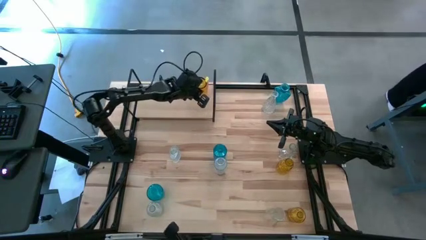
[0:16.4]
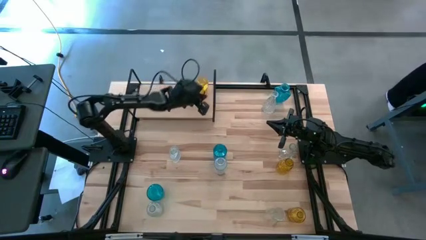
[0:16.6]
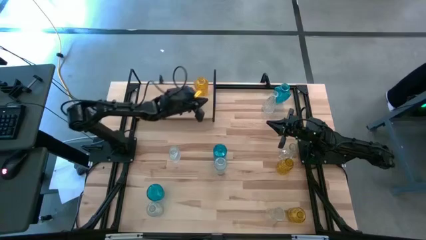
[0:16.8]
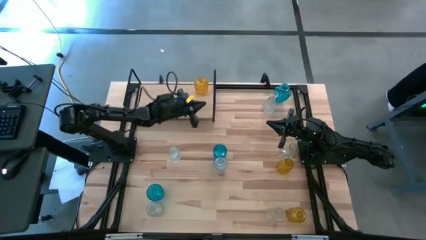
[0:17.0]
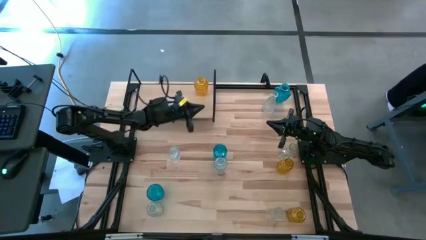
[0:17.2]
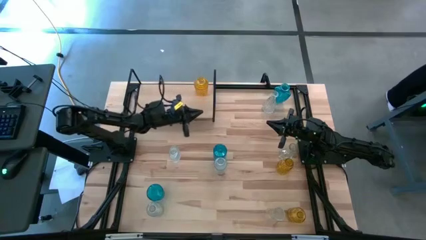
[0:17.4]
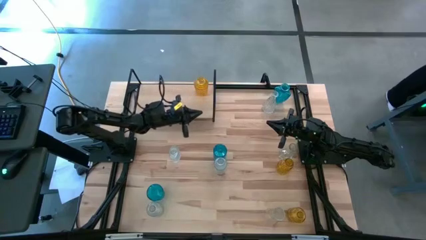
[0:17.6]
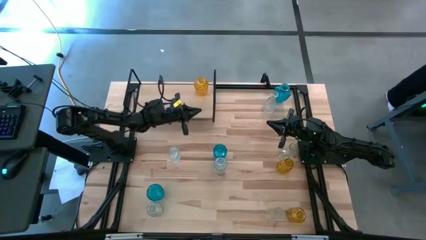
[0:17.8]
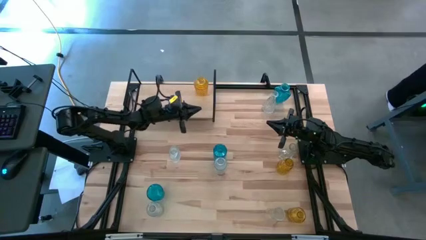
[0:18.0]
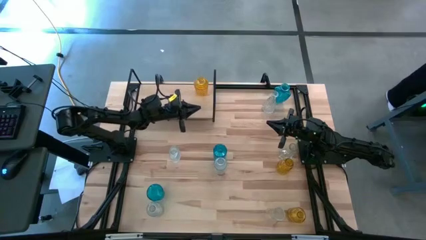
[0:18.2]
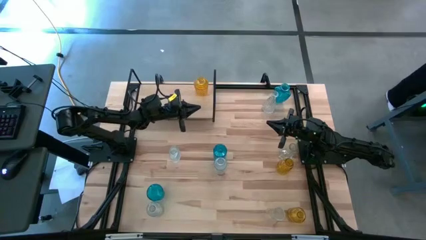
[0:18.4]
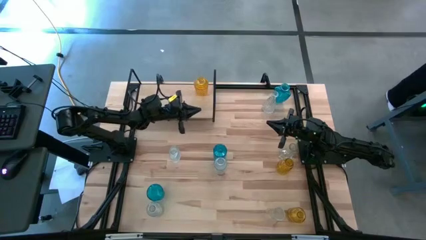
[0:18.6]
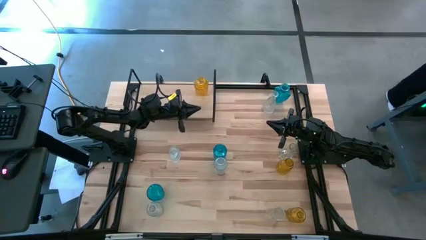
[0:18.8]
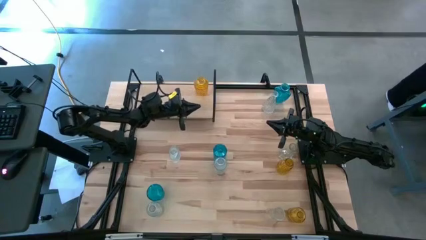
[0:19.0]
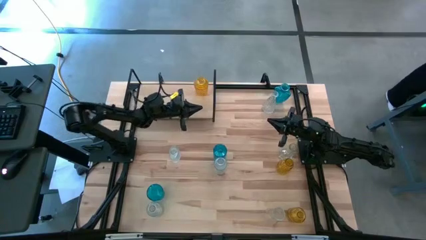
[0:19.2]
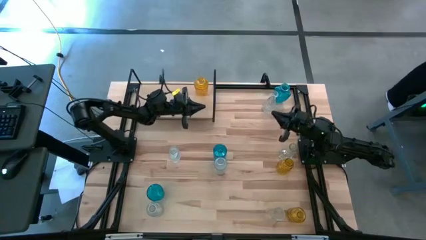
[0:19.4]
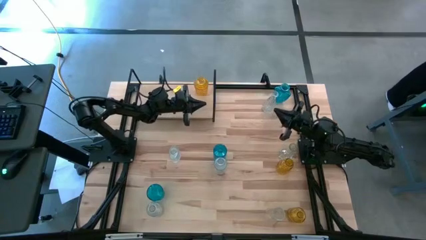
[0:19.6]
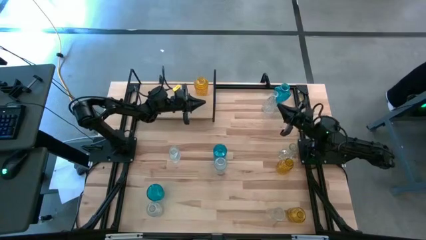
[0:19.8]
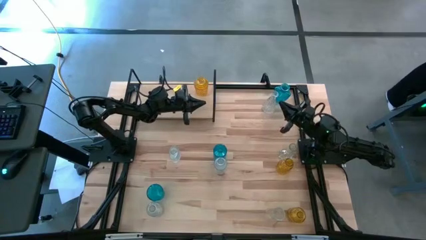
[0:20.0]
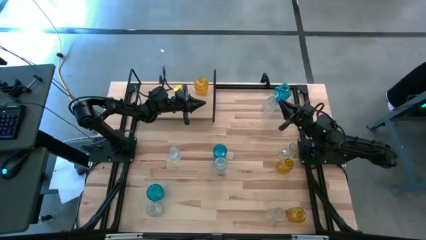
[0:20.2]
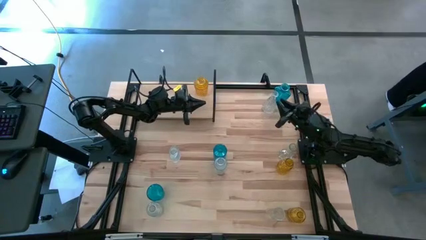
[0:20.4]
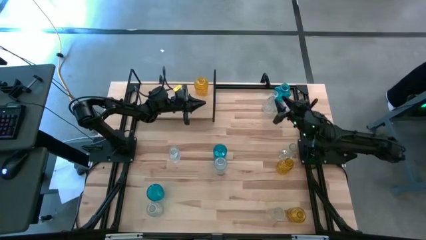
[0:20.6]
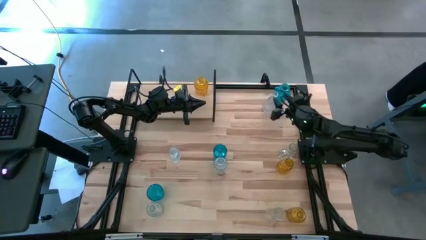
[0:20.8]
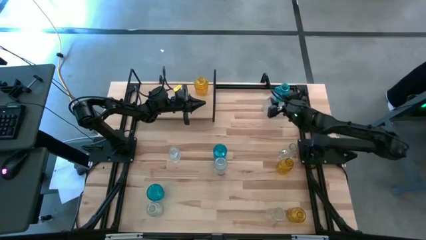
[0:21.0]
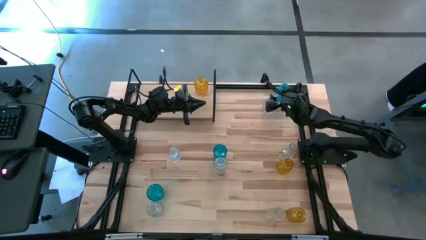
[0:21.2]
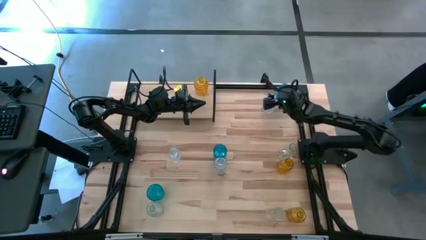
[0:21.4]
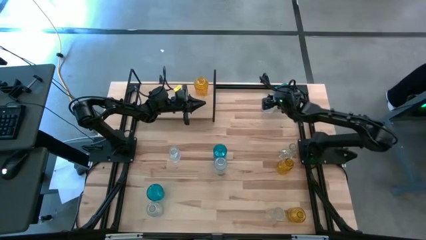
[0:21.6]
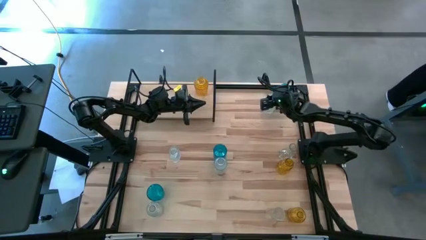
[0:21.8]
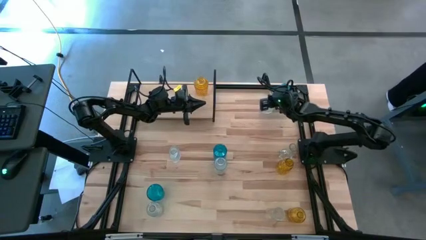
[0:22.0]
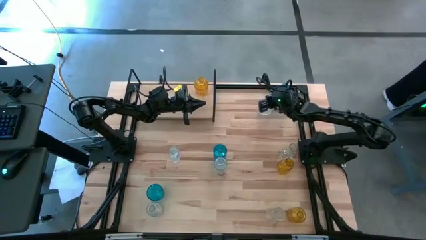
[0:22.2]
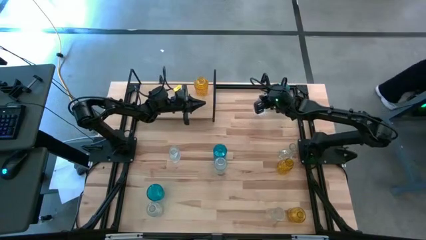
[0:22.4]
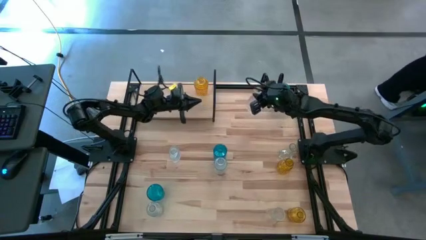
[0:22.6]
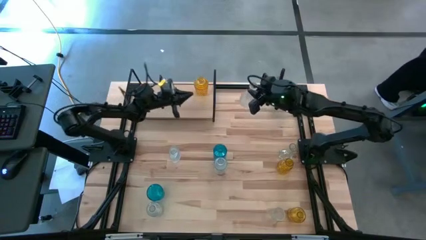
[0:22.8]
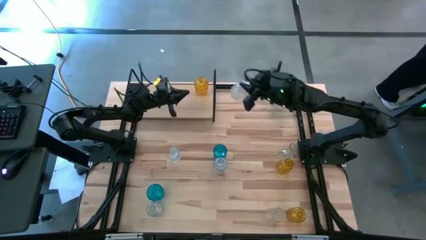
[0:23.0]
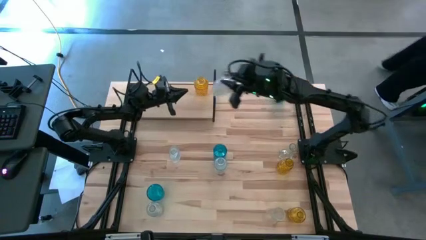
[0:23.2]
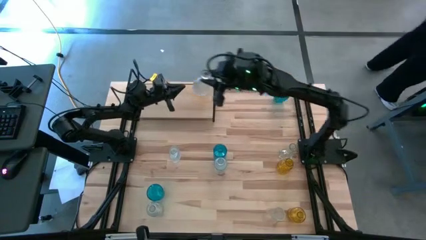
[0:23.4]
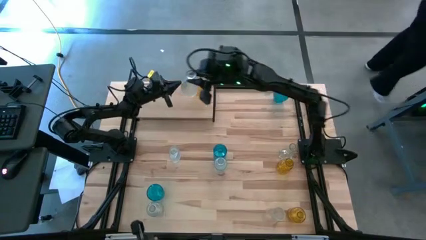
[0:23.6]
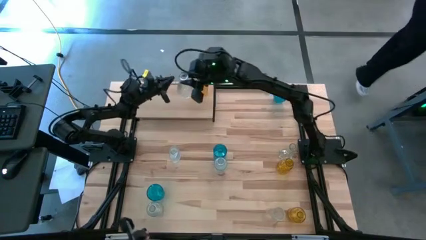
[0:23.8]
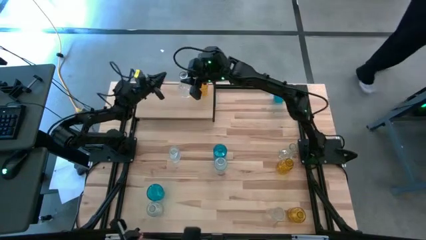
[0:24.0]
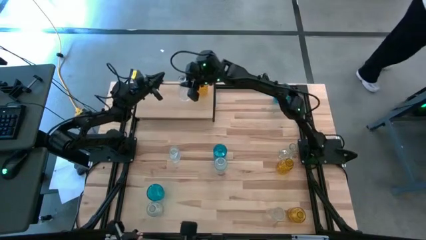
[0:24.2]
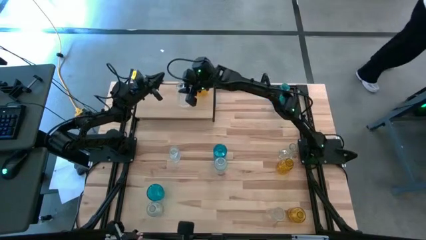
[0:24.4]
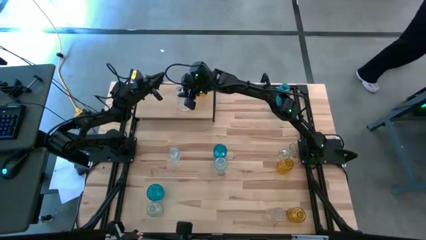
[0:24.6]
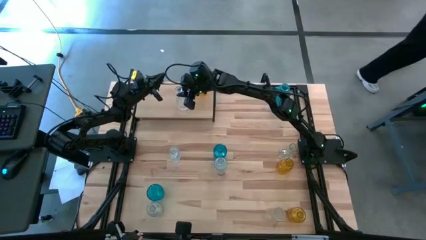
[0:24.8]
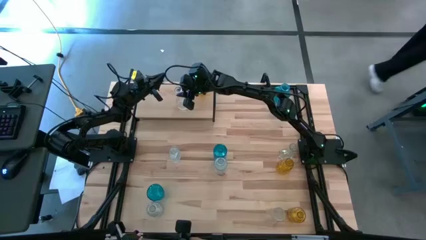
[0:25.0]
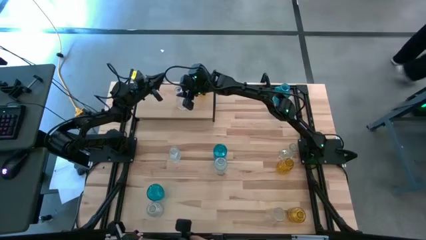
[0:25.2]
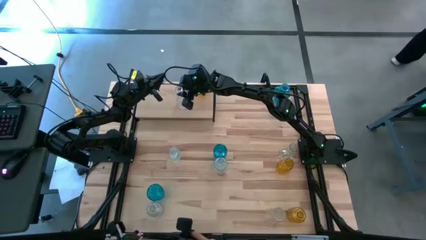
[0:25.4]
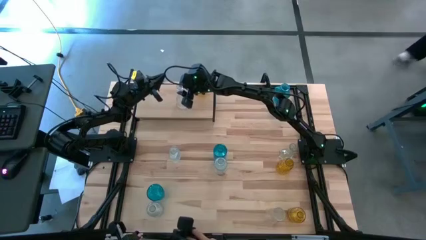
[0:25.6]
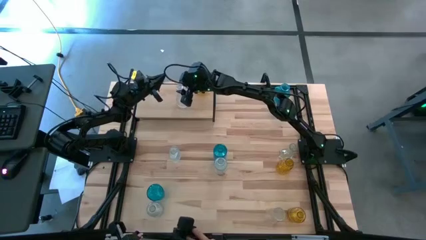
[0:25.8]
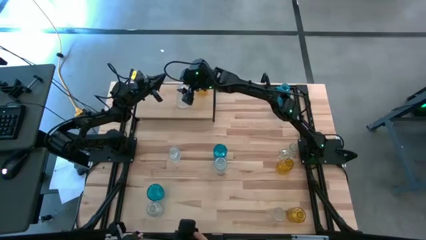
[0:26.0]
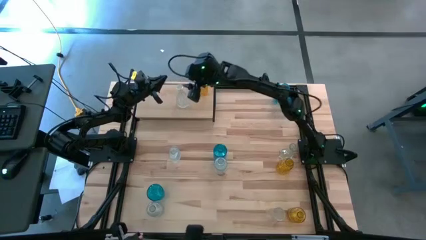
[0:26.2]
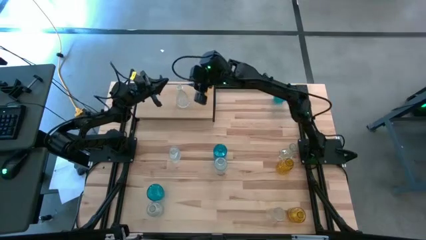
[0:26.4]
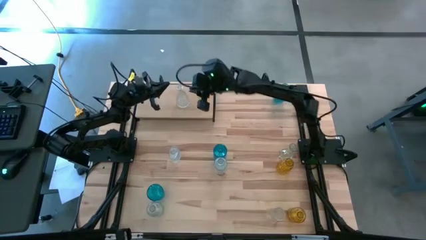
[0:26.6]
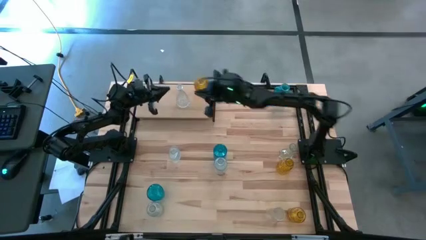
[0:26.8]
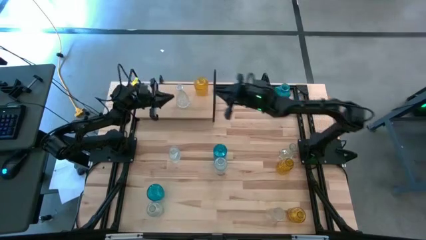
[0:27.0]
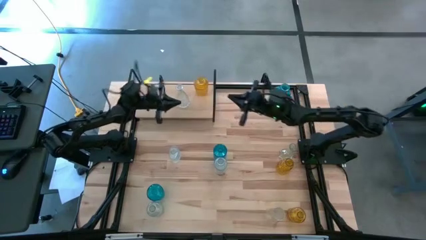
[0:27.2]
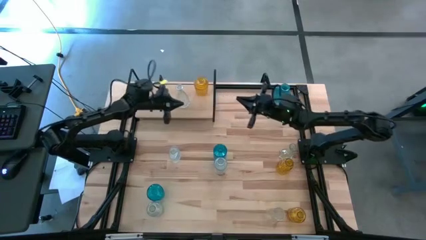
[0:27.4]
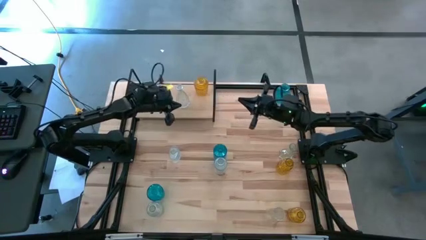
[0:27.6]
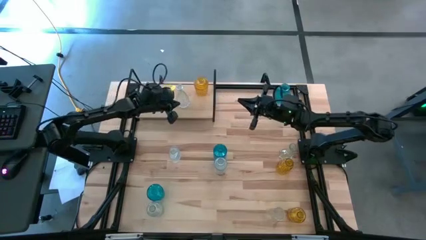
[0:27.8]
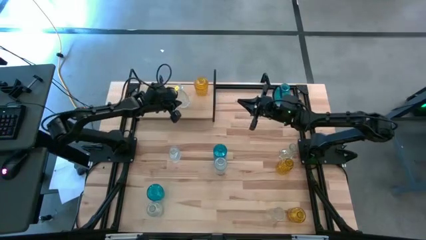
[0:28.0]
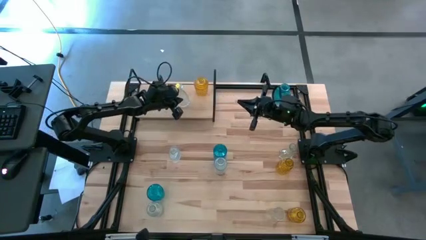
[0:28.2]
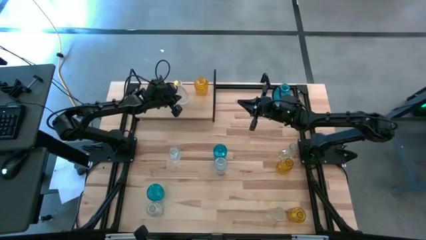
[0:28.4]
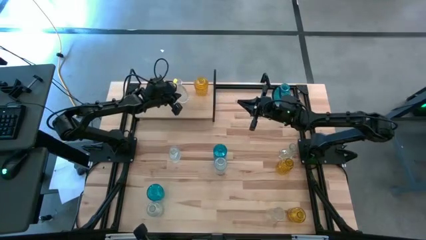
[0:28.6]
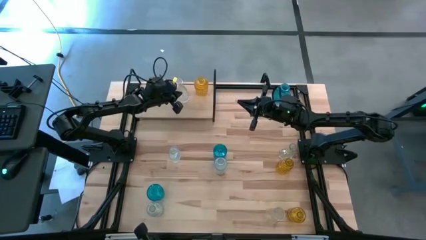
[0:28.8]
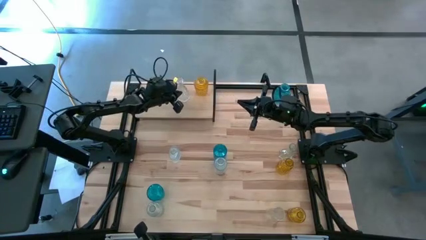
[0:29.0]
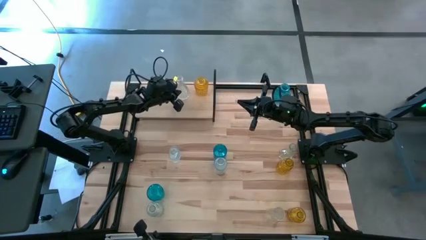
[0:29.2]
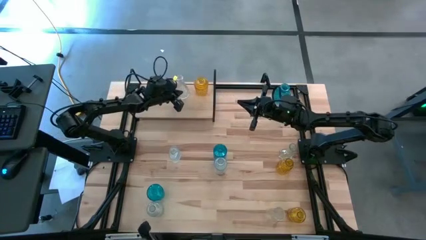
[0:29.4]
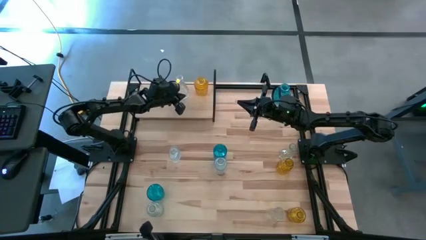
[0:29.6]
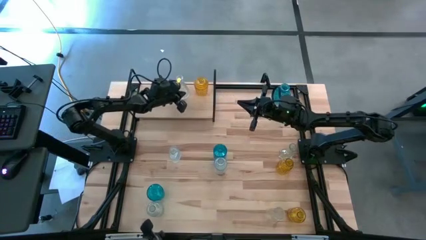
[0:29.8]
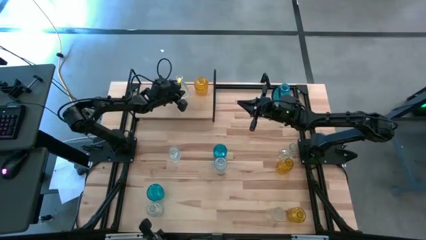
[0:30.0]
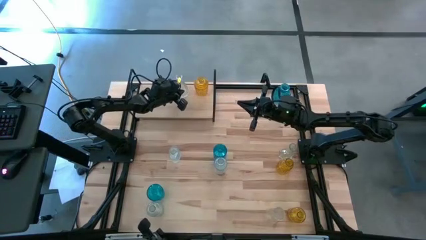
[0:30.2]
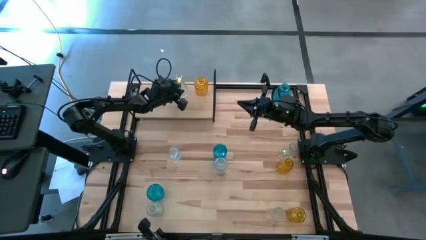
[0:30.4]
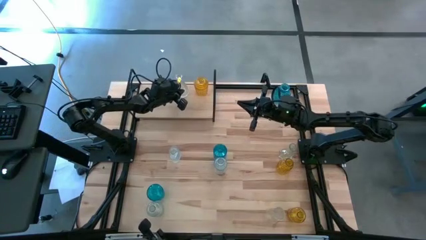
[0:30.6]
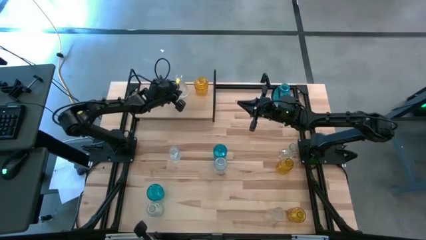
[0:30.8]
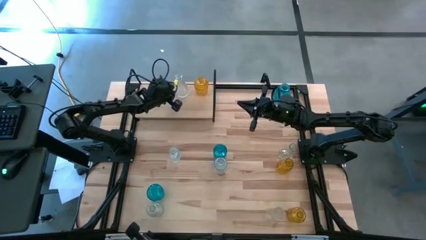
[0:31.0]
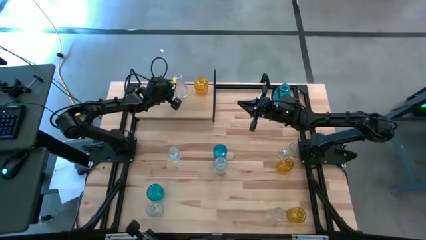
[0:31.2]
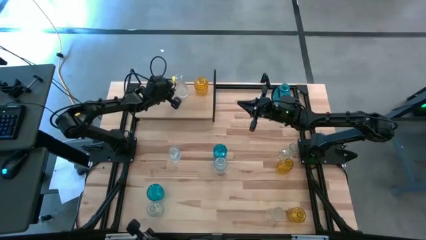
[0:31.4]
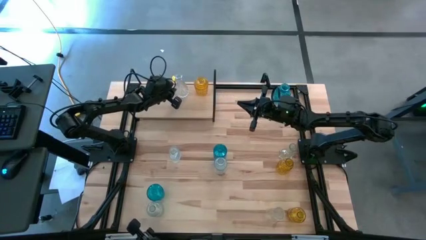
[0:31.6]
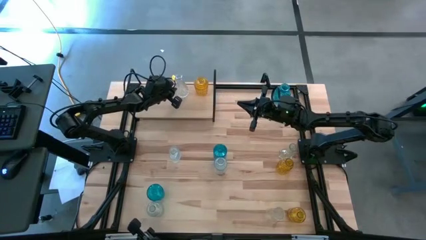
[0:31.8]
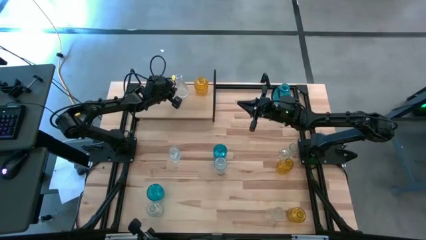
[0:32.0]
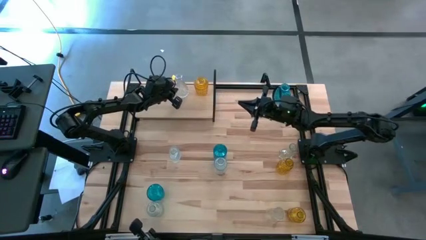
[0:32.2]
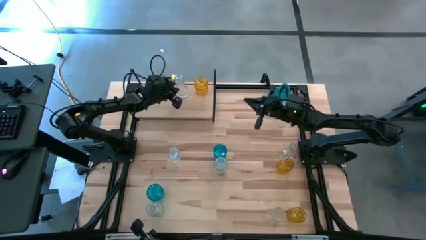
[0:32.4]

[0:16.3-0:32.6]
Task: sort vases onto shelf
Put the transparent vase on the shelf
